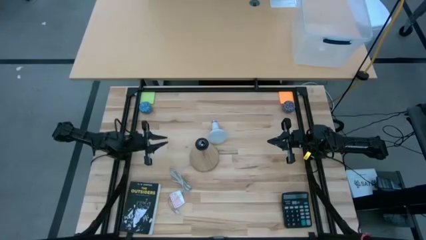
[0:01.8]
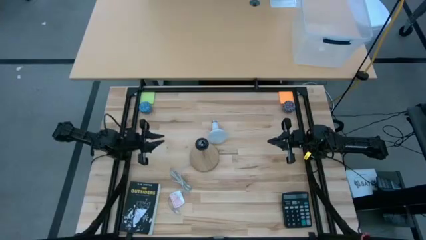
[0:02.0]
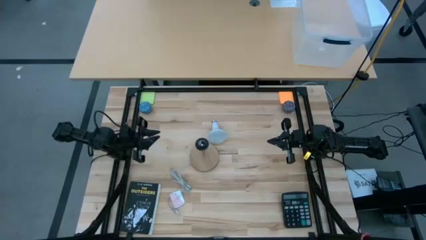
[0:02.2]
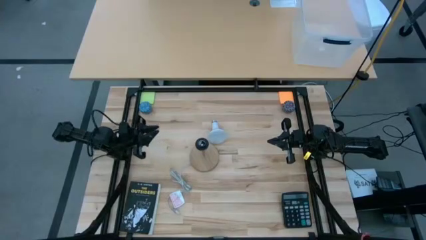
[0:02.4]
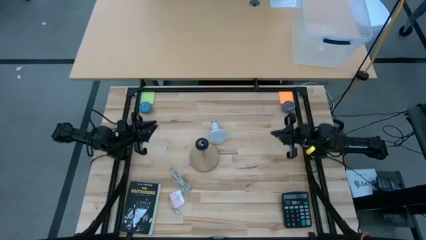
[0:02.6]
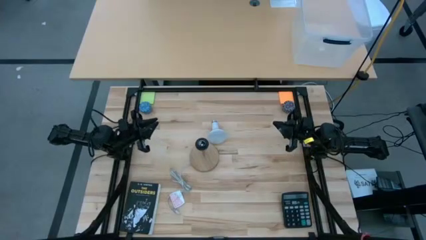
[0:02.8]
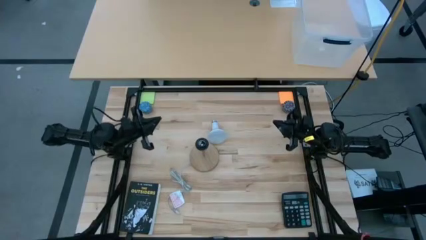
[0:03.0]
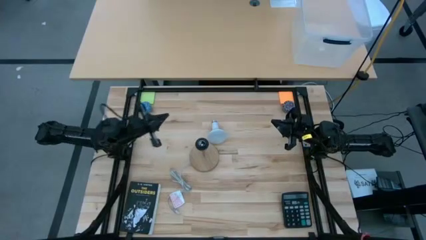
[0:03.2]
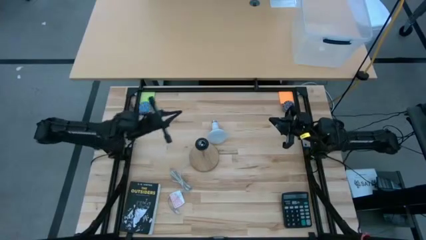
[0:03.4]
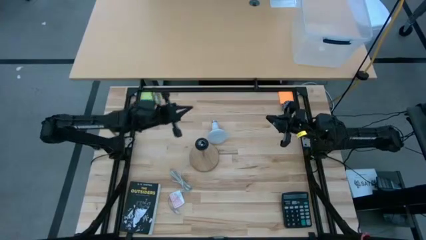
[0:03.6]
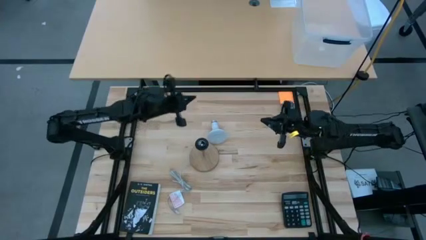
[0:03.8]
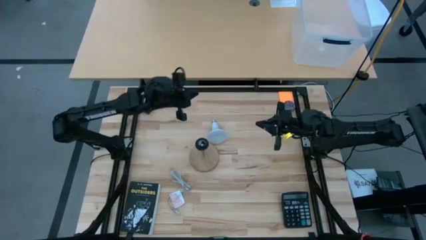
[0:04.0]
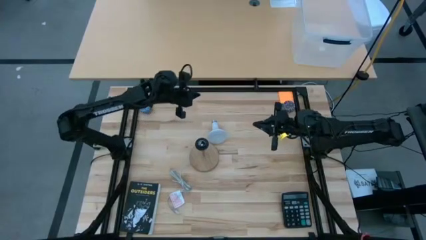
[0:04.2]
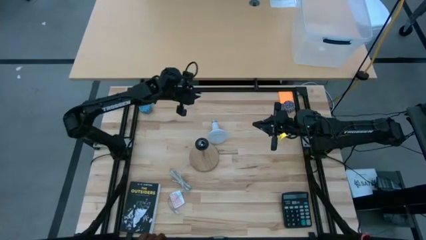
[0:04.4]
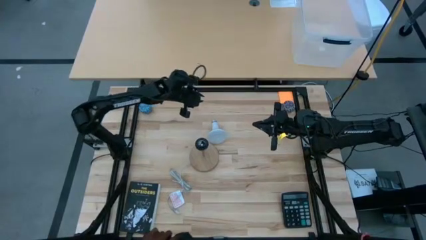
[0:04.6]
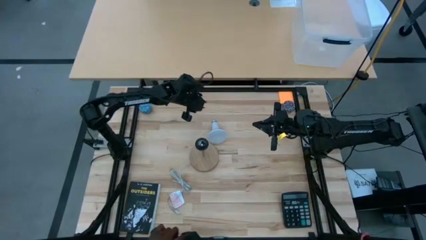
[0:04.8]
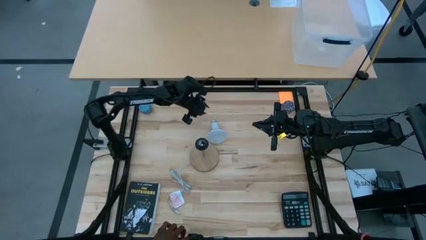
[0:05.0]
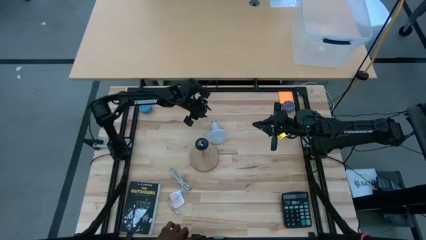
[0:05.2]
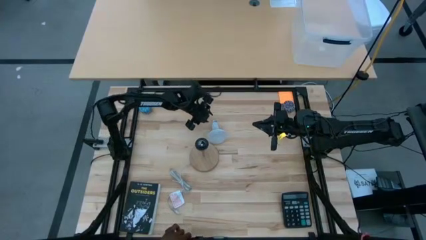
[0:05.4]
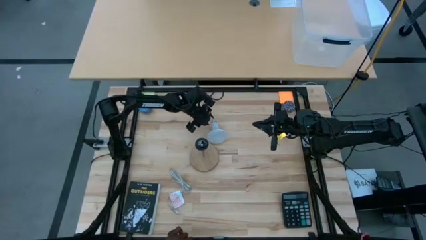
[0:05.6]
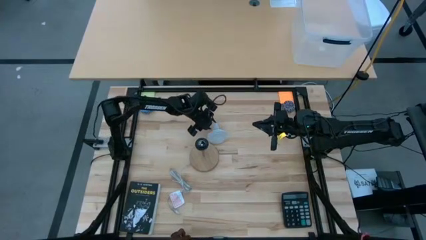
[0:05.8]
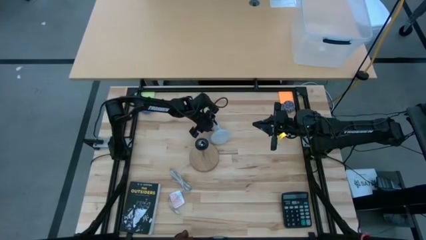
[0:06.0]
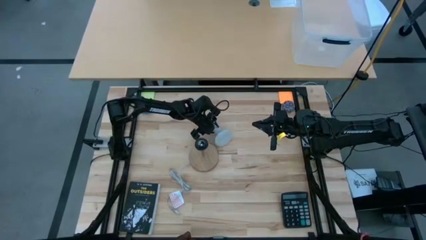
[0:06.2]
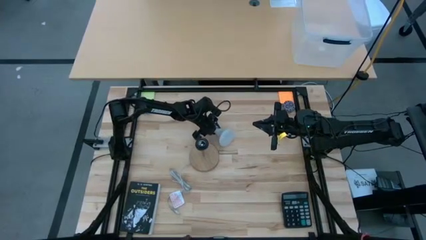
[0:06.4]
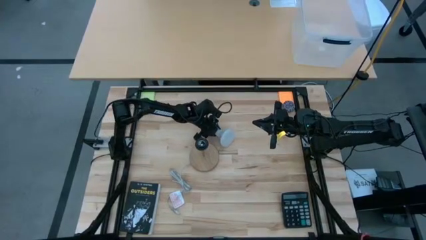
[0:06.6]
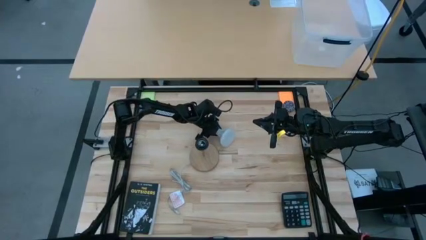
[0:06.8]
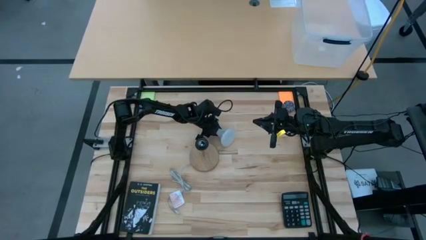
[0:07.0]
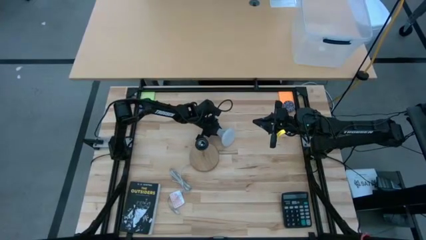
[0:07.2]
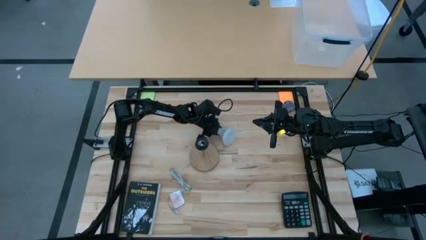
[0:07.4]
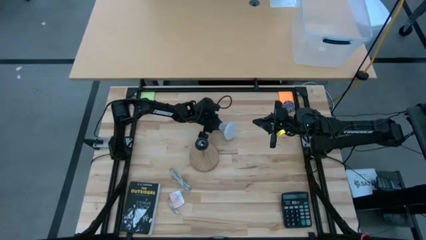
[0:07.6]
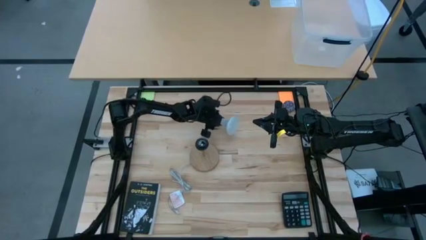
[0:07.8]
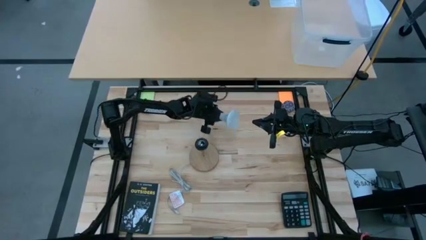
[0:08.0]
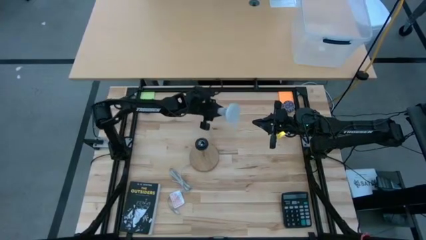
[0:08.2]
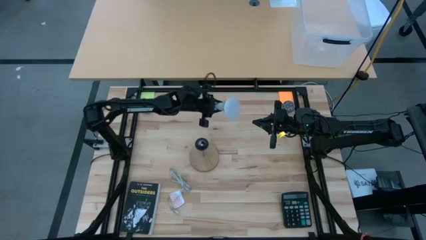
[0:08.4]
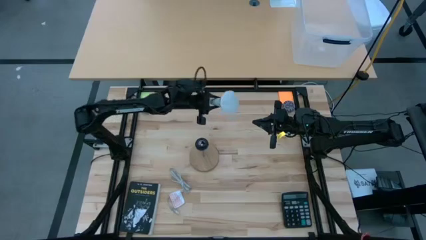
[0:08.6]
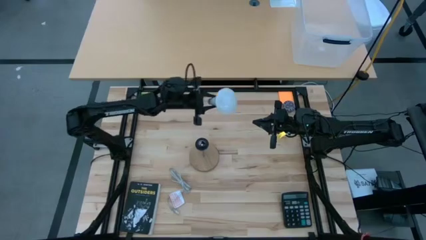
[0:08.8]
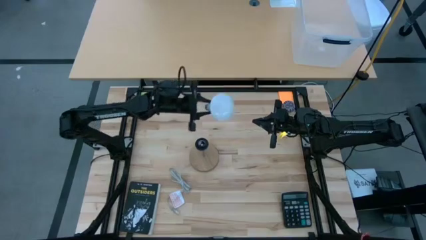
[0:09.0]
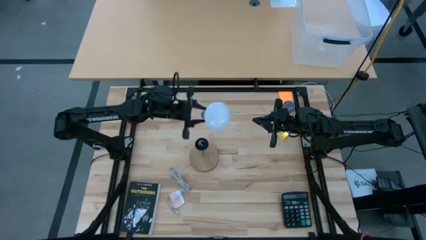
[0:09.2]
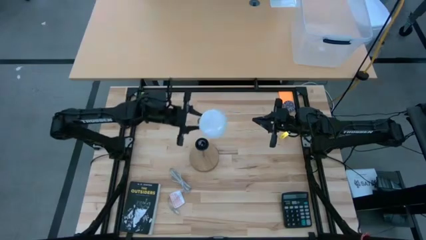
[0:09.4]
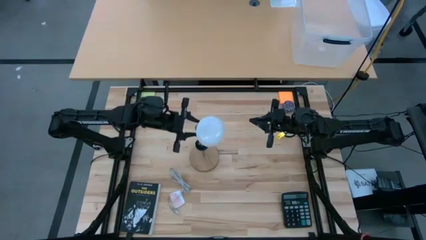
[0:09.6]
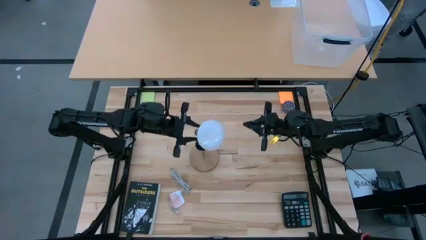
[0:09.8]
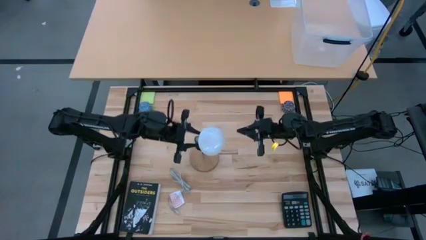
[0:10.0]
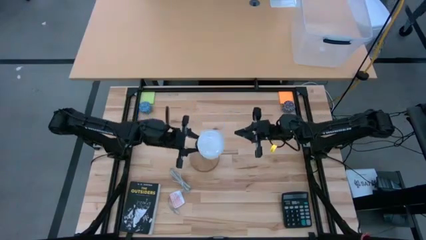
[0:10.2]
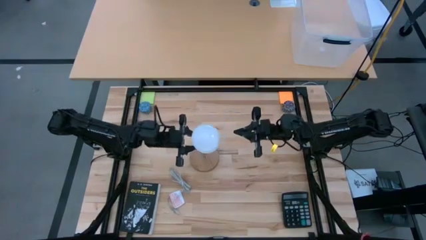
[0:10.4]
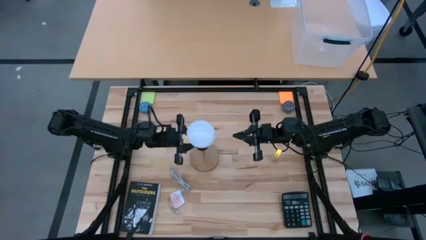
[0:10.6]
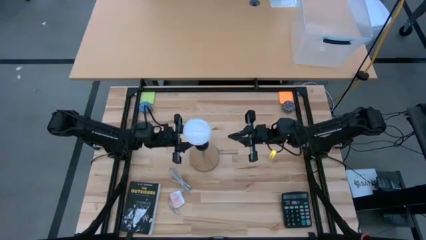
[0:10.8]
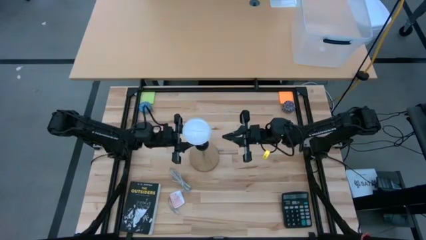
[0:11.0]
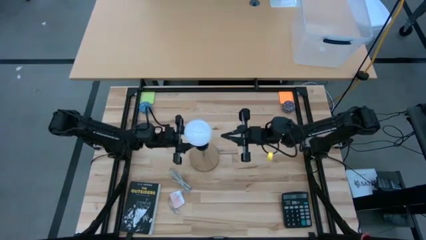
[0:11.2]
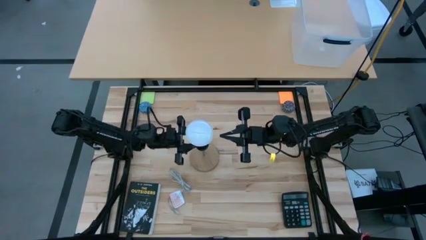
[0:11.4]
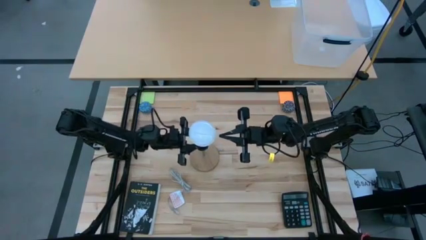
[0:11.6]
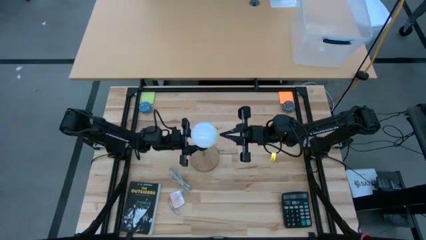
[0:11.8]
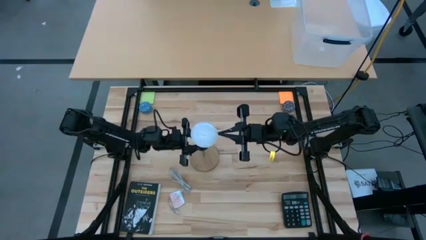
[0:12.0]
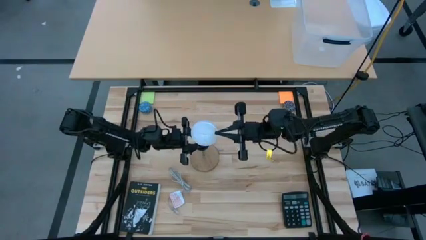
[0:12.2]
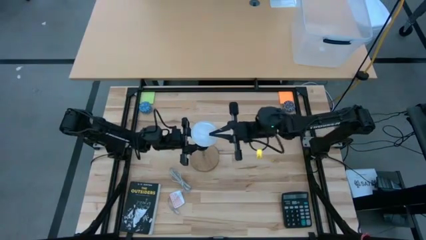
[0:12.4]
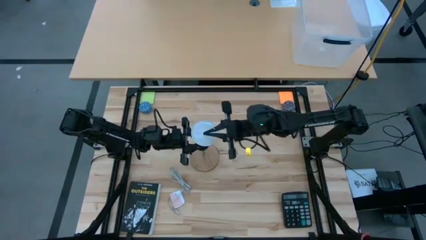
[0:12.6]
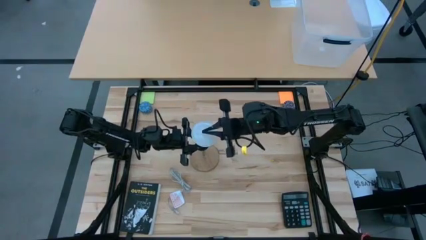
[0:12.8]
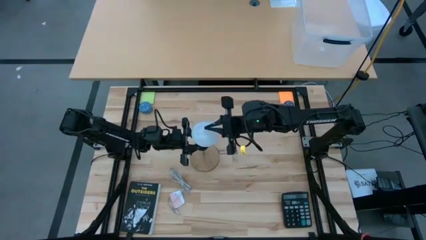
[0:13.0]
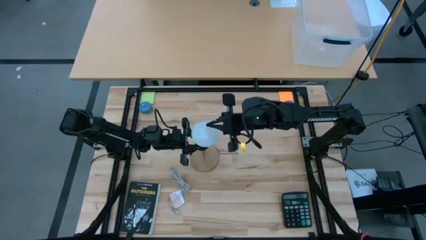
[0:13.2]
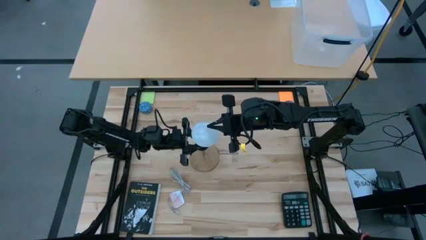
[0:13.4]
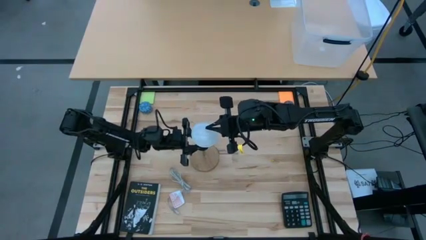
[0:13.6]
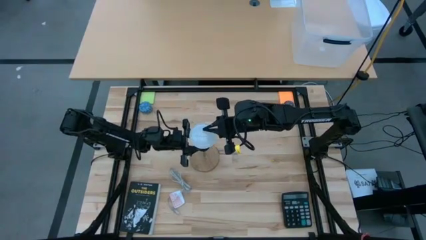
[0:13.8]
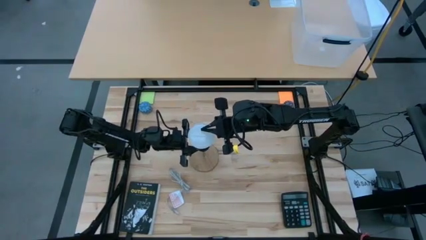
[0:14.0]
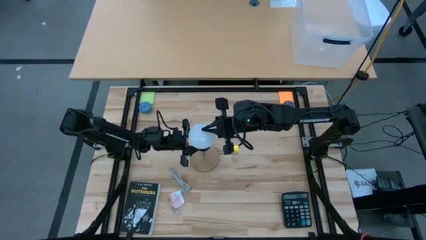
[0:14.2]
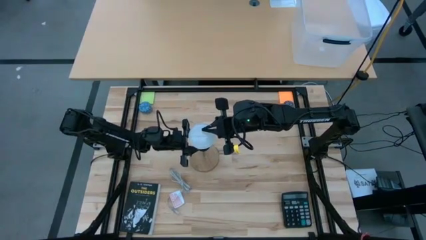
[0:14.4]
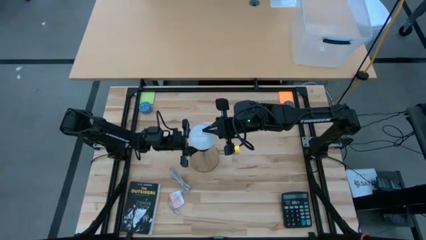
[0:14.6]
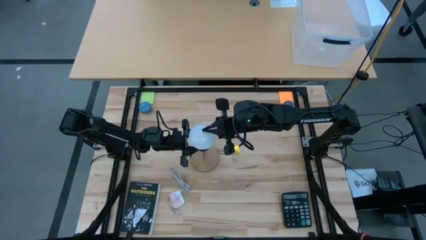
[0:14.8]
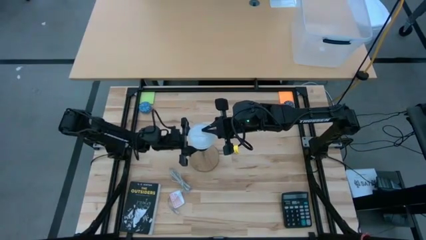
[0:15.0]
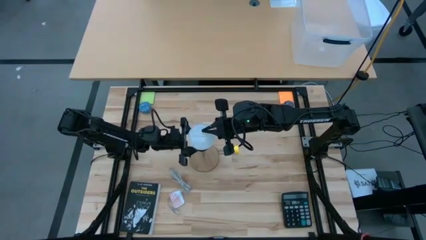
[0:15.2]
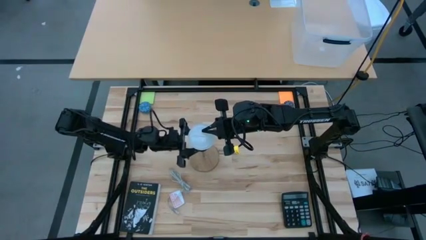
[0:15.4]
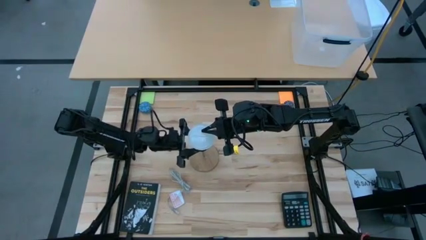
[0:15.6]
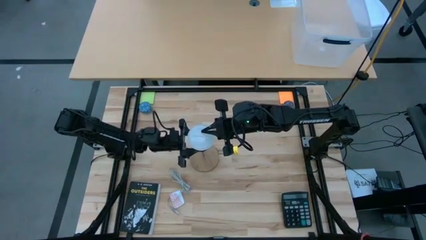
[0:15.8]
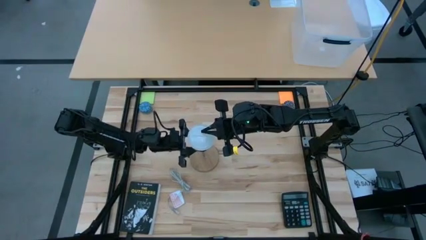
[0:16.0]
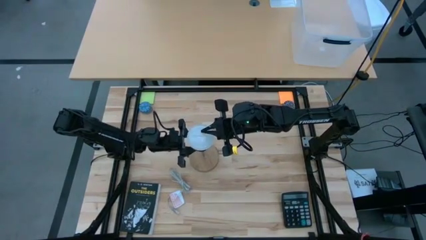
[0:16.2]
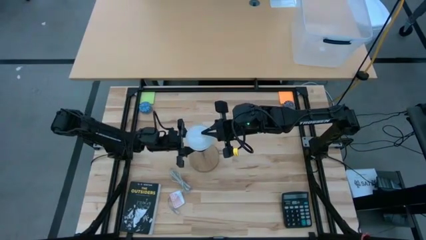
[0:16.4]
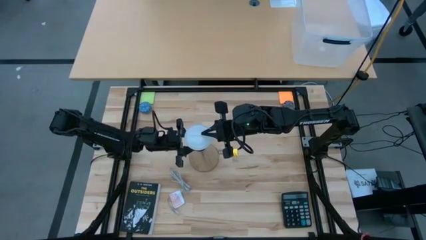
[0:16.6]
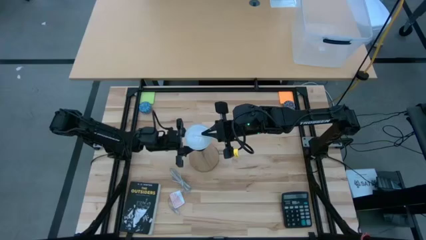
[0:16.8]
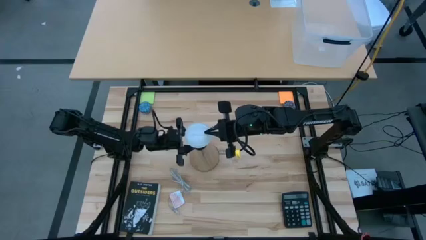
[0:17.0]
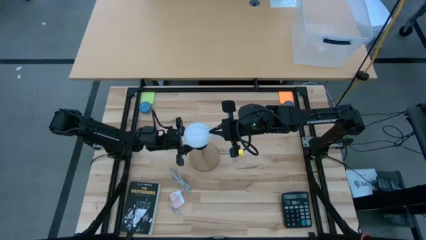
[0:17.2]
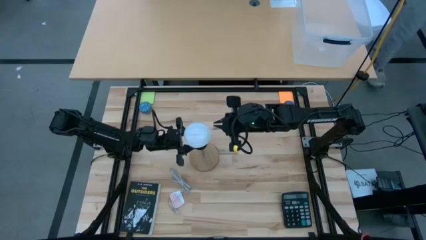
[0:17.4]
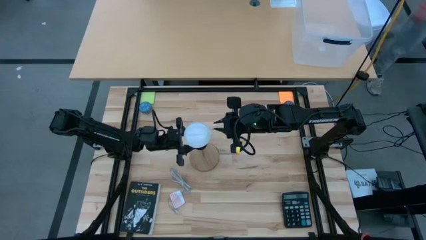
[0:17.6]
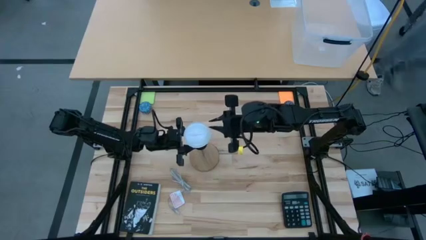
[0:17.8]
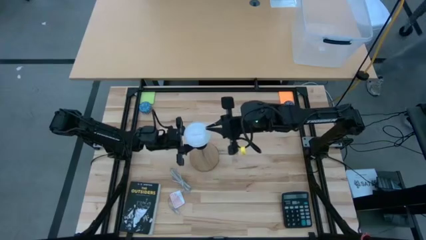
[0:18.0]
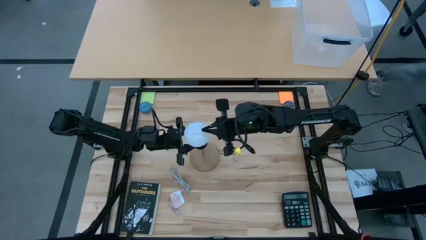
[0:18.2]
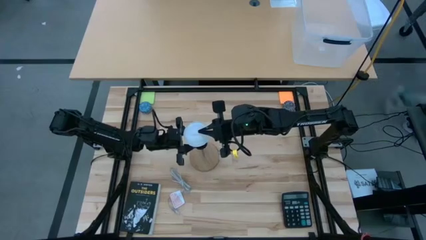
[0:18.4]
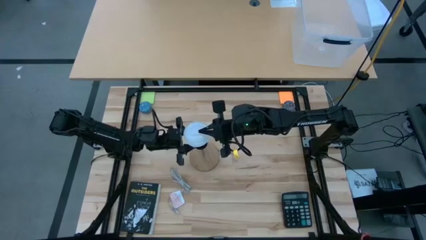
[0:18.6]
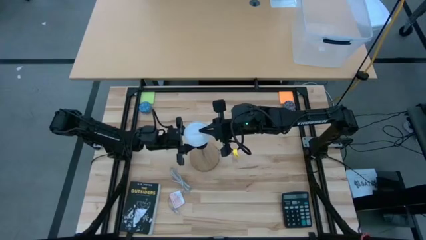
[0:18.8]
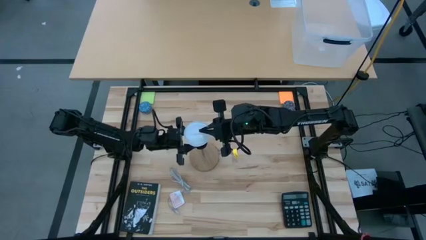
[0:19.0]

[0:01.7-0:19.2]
Task: Screw lightbulb
Insert the lightbulb on the lamp
